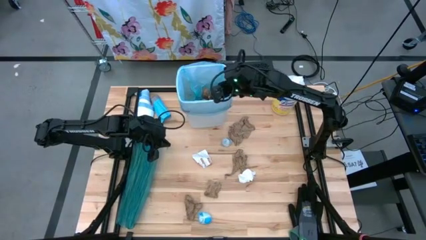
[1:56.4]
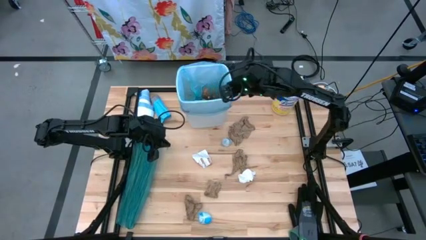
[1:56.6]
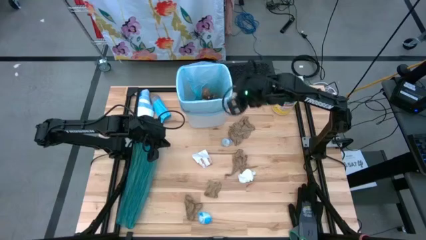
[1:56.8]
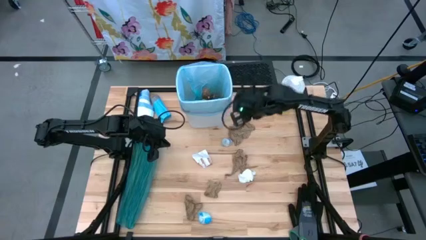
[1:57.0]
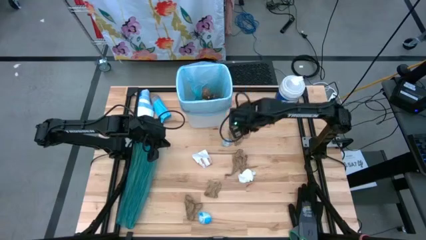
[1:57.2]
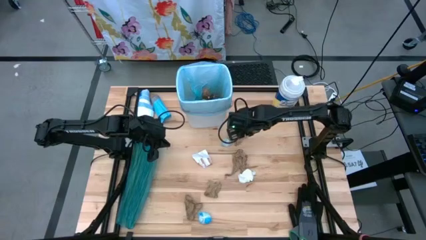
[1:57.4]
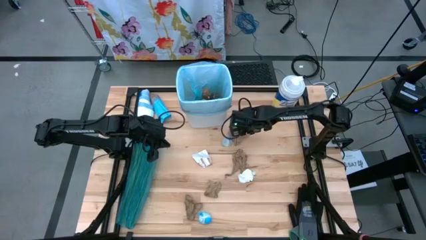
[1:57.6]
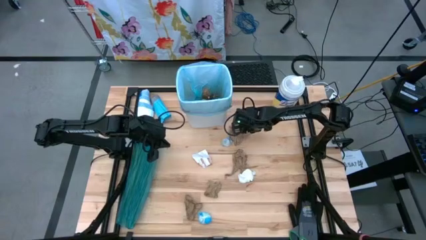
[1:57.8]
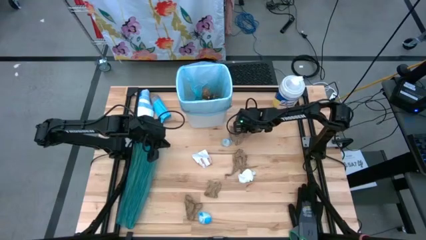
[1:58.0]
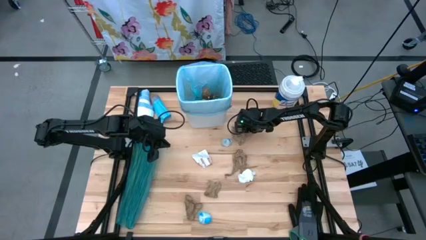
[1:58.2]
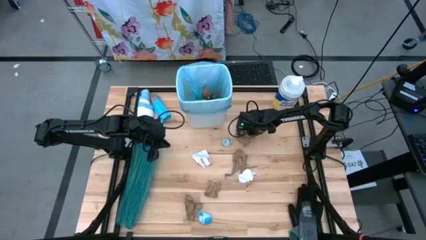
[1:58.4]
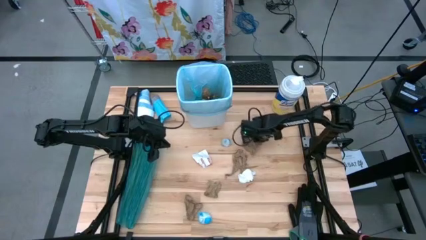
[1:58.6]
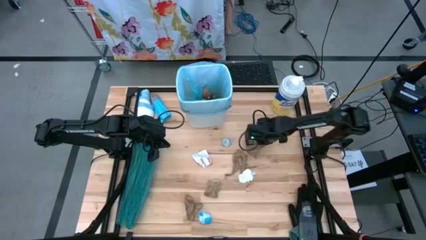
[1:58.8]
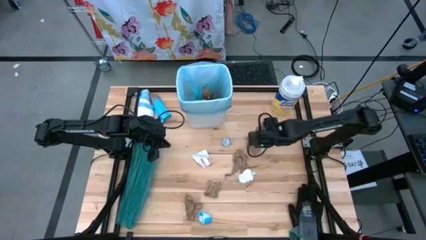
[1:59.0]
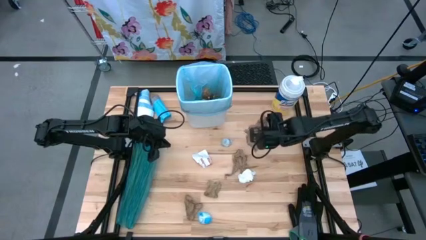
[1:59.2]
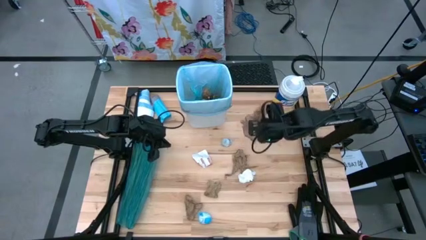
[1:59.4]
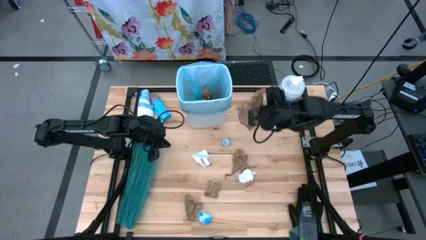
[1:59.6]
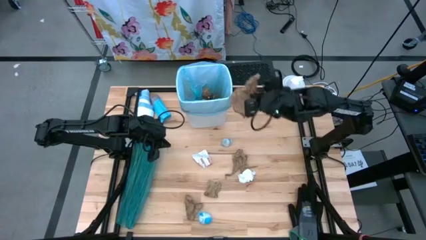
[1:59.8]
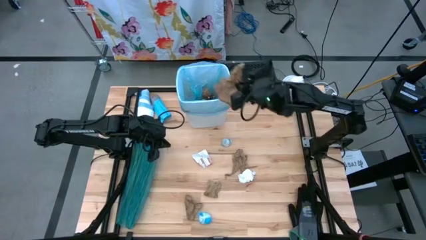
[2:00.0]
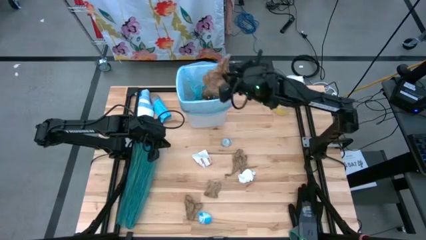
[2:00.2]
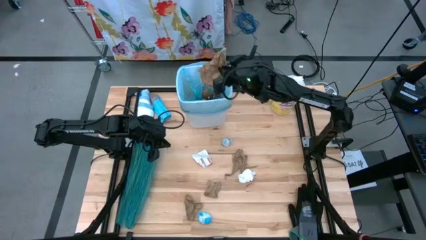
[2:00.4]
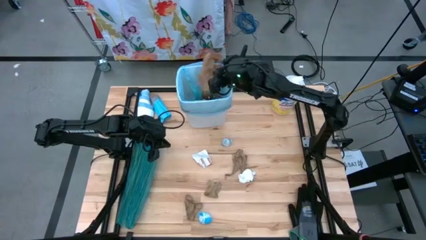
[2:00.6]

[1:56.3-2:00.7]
Task: place trash/remove bag and relplace
Put the brown napkin into the white trash bin

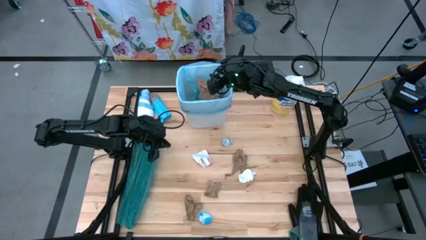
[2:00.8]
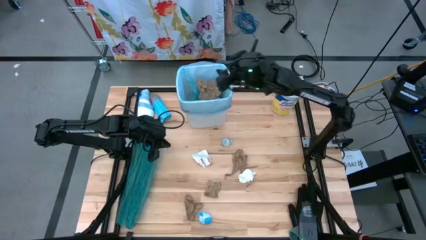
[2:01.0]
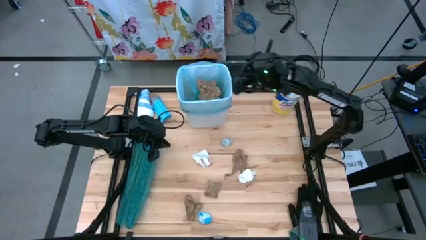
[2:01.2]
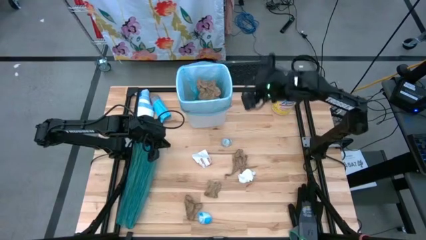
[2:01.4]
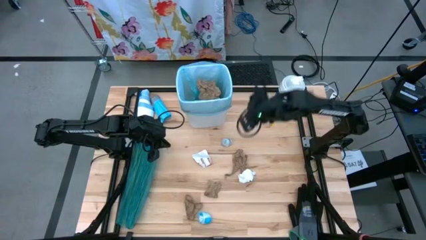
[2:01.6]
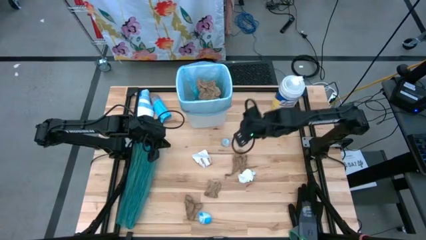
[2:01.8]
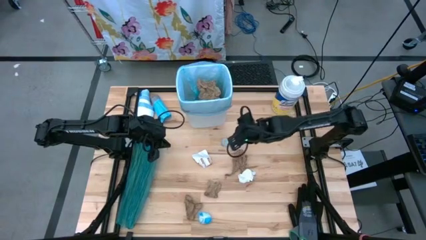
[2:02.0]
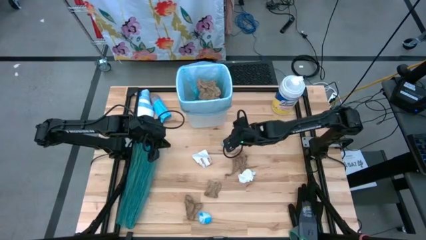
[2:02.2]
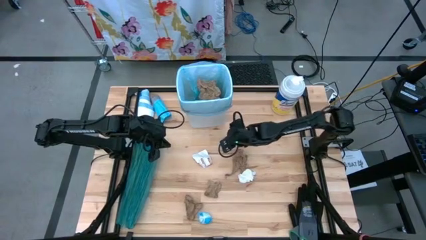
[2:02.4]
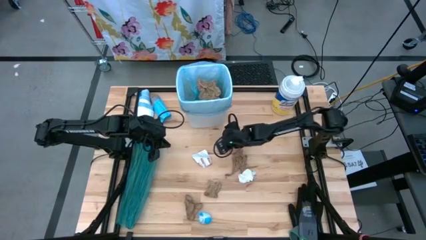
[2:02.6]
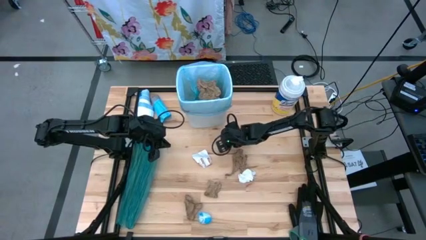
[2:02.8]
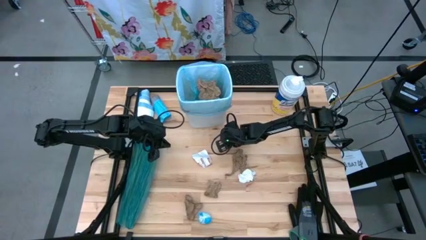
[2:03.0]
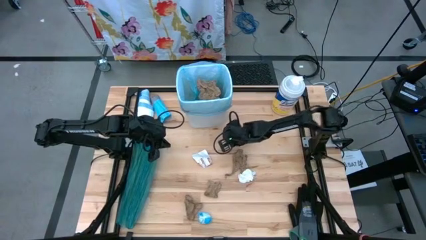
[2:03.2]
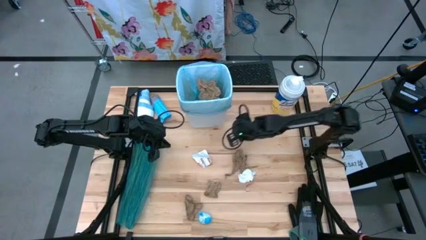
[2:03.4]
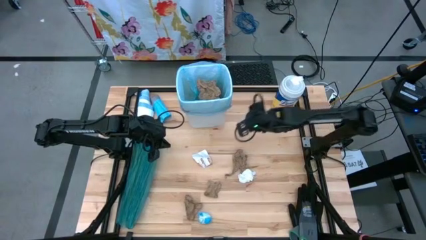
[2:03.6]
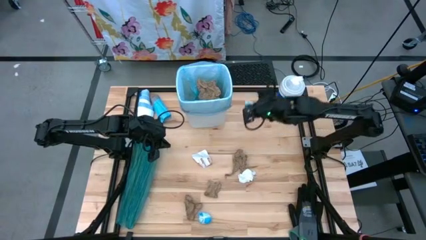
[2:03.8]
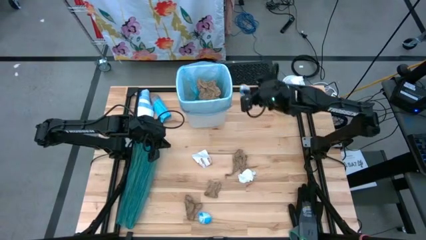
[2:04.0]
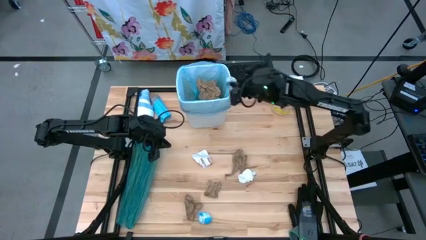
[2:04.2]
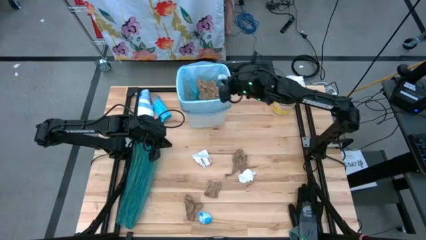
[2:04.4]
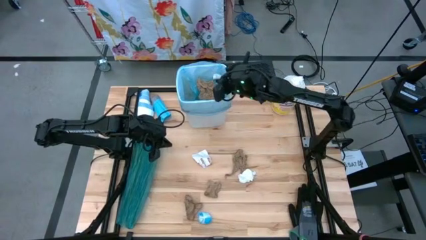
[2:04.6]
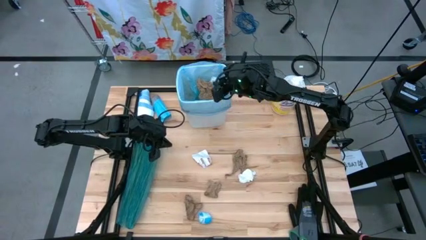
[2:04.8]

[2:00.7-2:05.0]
Put the blue plastic into the white trash bin

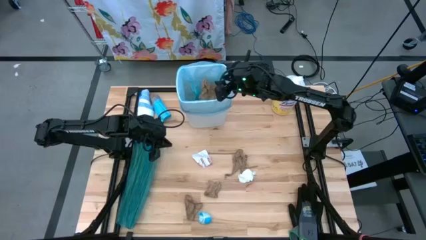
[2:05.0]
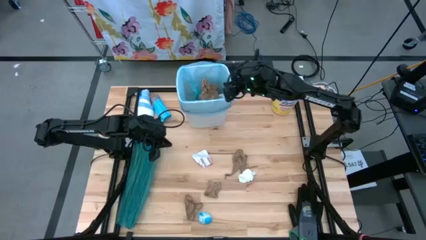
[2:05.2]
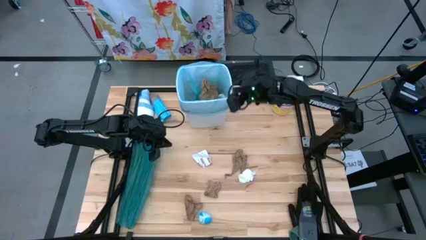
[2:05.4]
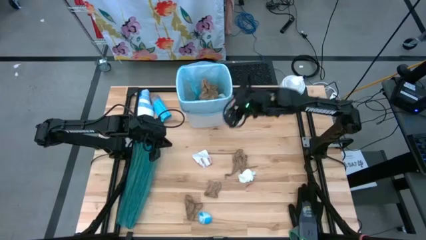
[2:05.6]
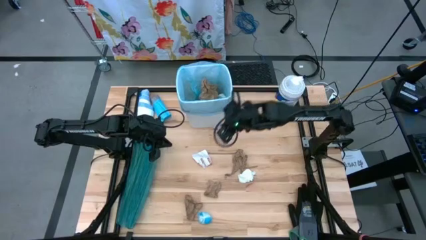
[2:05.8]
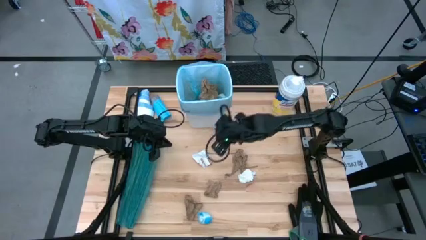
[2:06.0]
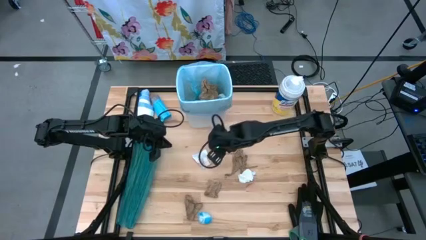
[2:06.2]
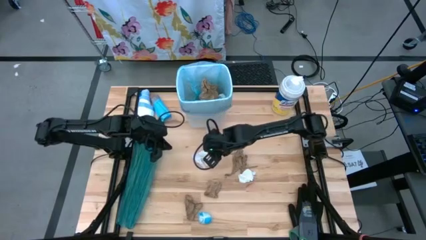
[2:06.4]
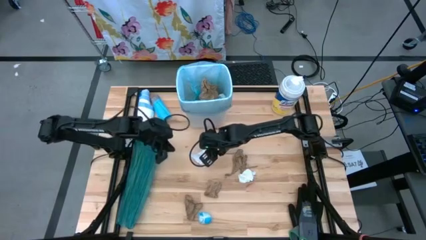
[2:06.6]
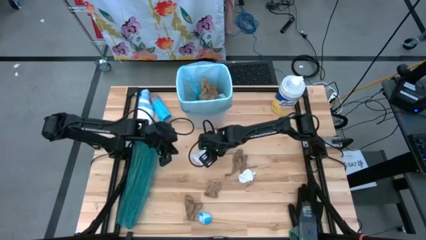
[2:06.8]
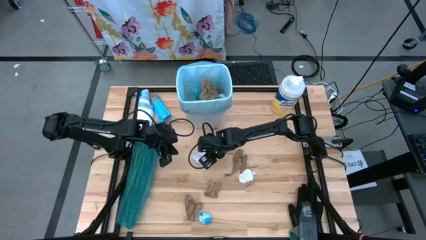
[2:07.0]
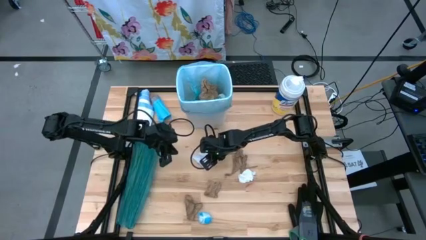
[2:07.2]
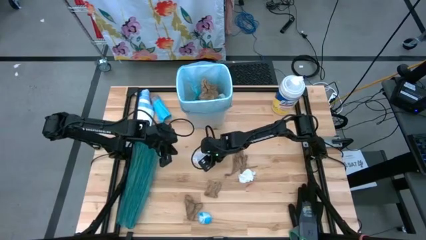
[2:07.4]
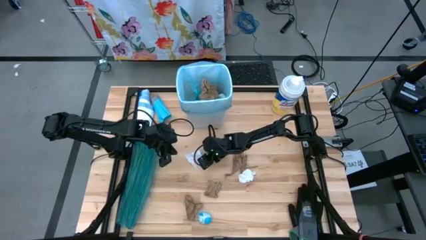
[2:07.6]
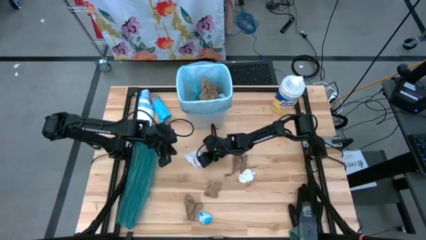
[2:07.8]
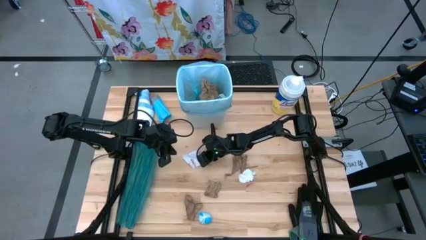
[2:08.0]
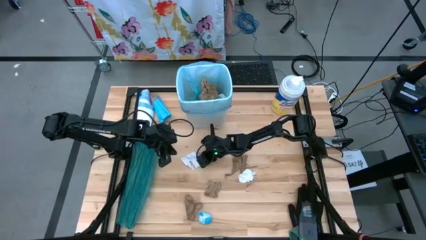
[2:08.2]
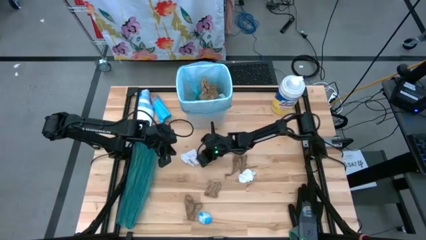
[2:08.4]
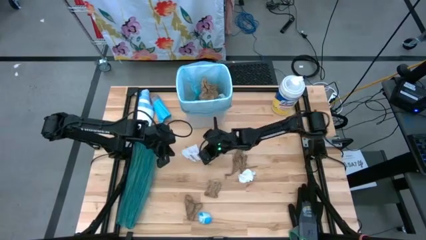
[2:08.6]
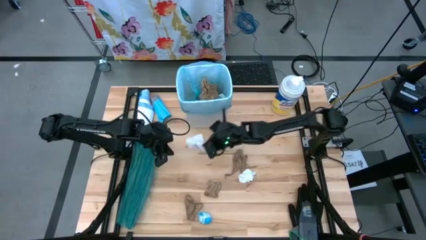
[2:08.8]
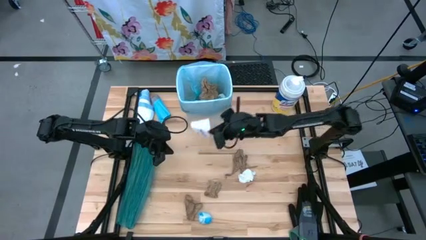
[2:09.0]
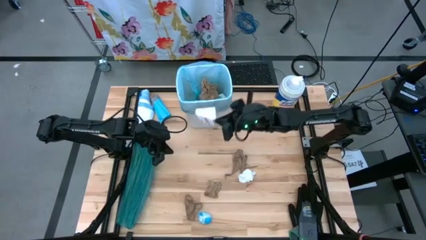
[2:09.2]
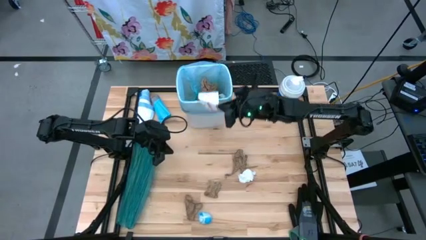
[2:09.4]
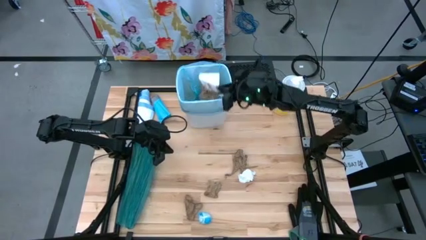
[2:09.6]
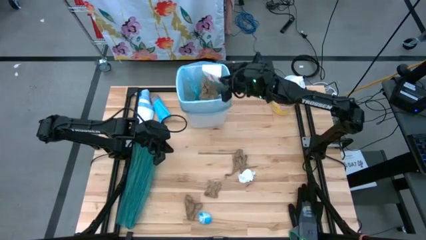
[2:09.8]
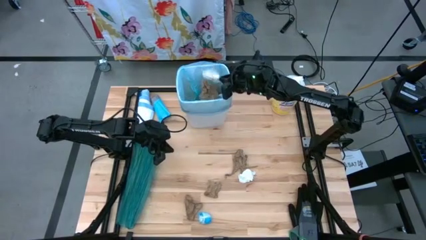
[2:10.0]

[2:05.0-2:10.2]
Put the white paper into the white trash bin

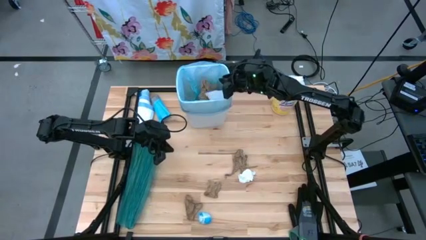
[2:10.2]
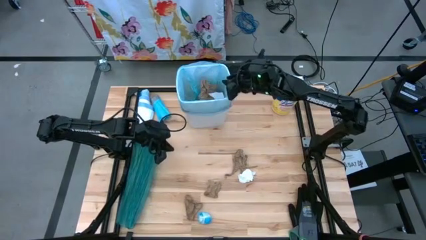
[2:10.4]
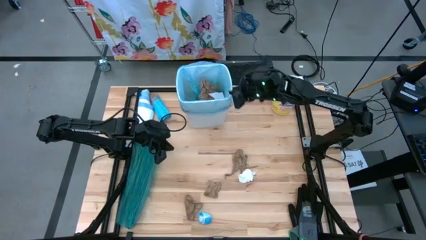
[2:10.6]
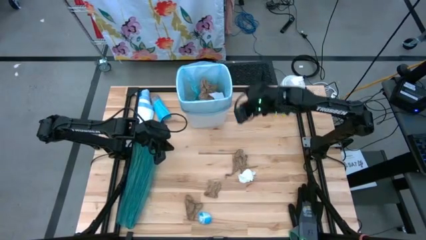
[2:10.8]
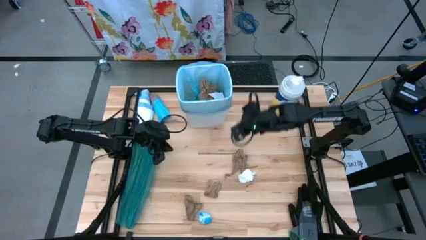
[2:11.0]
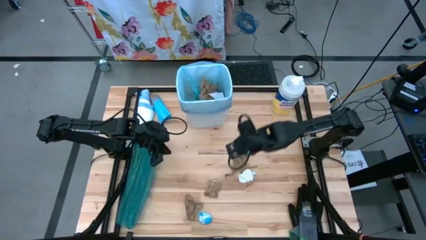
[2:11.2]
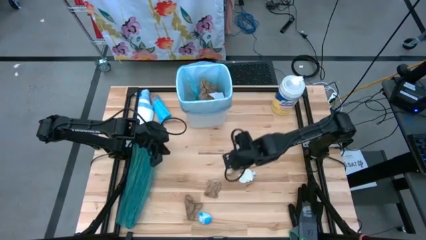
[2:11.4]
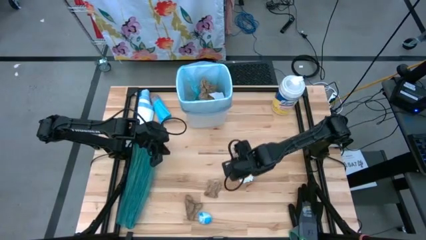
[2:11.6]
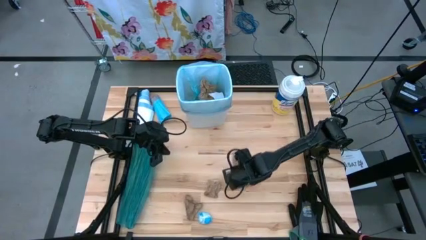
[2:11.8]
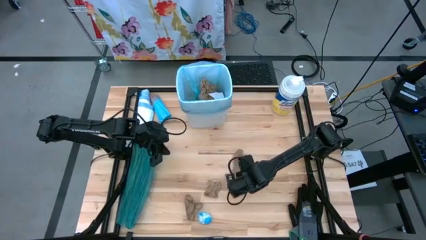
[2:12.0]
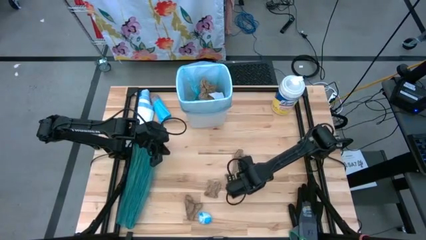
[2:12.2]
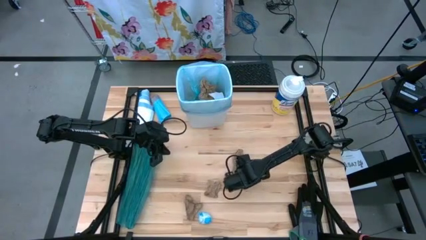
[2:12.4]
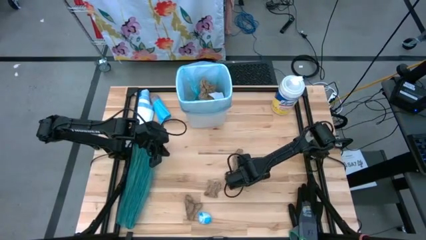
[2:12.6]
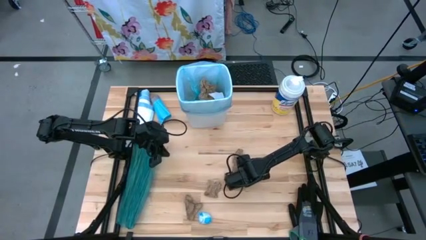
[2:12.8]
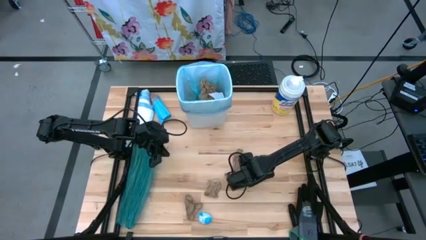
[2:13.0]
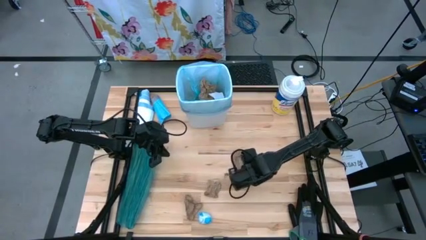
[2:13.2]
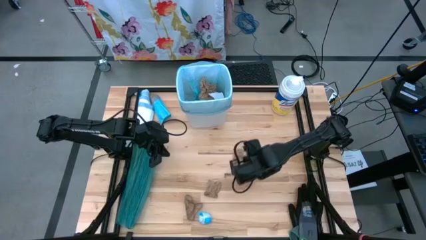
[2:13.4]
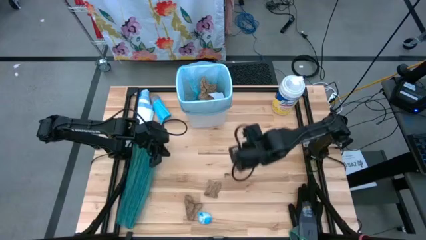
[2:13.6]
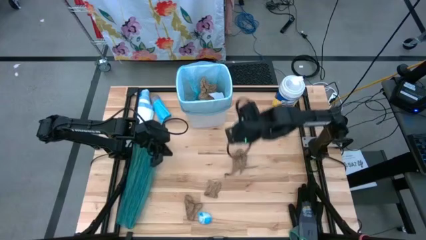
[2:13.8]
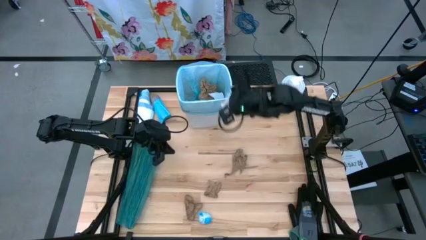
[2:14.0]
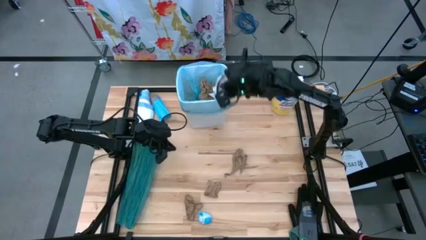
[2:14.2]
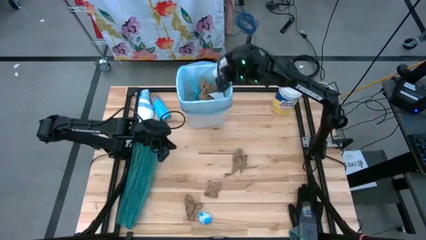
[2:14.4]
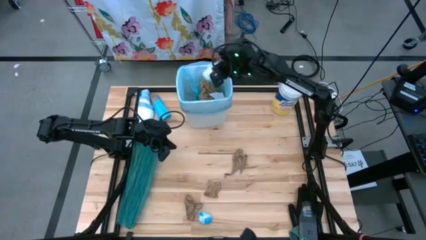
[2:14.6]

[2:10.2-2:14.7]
Put the white paper into the white trash bin
